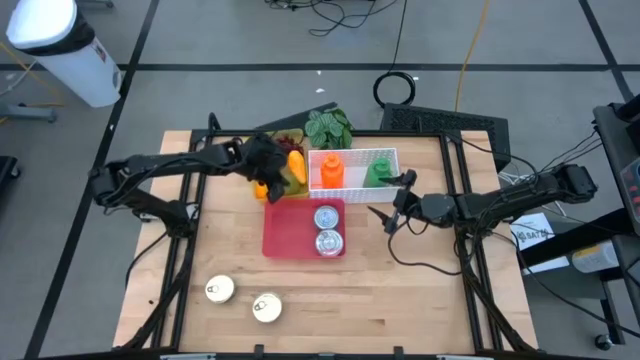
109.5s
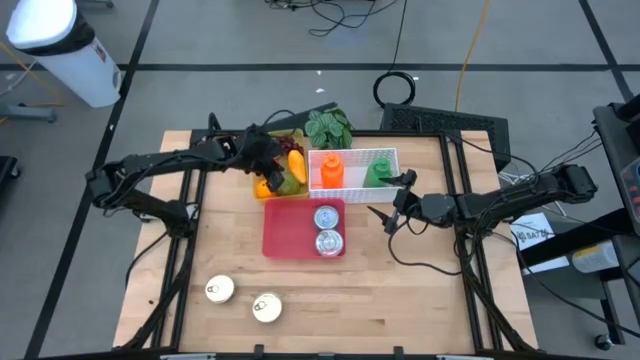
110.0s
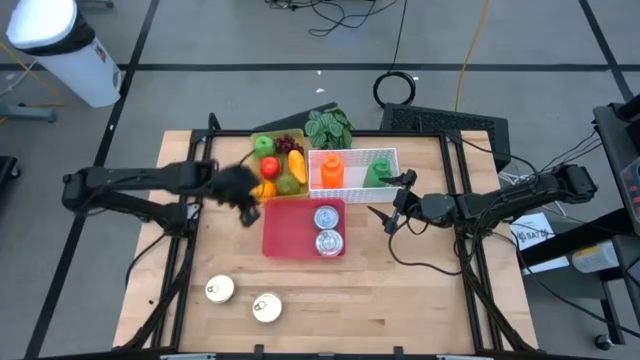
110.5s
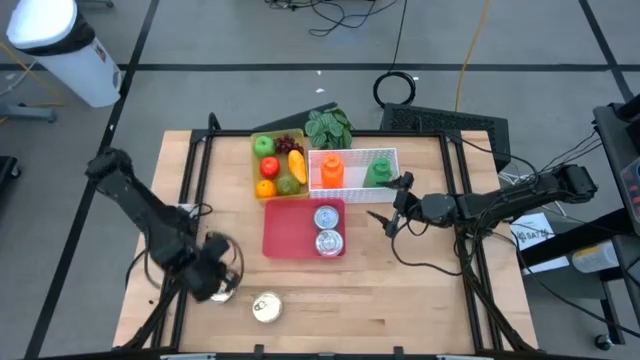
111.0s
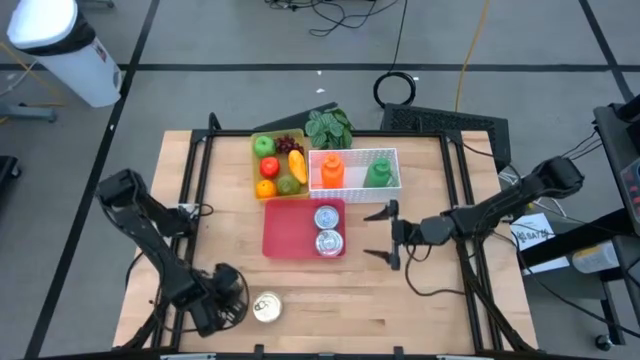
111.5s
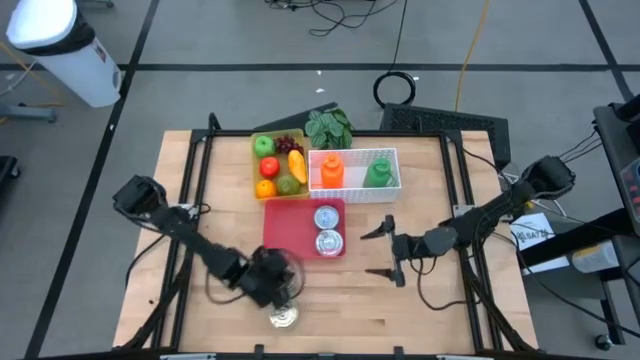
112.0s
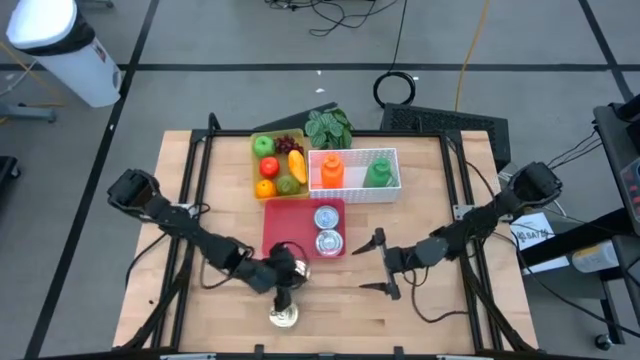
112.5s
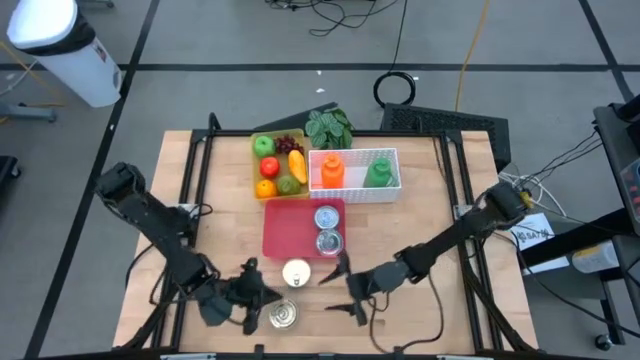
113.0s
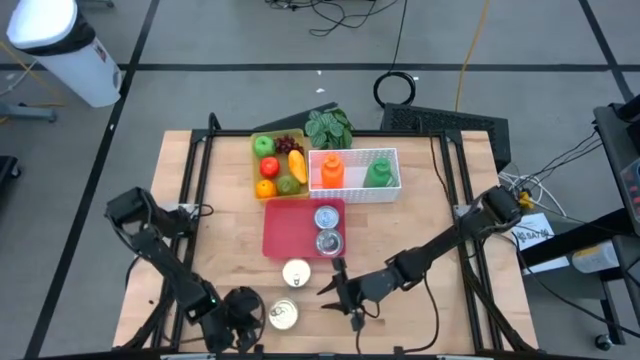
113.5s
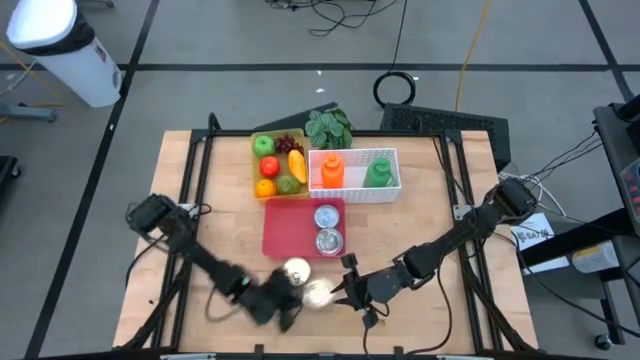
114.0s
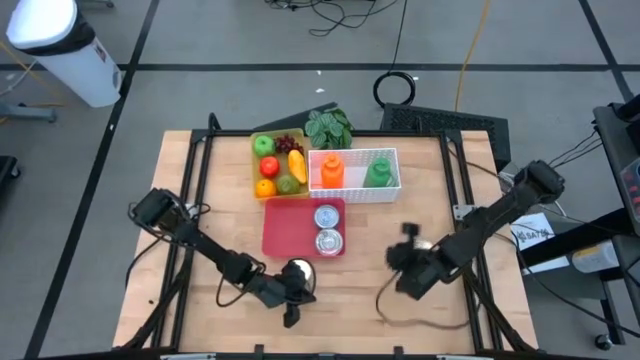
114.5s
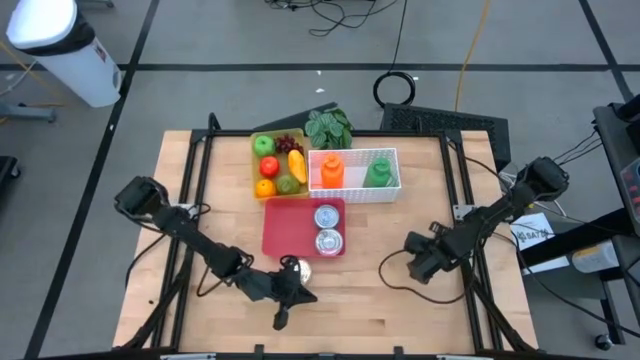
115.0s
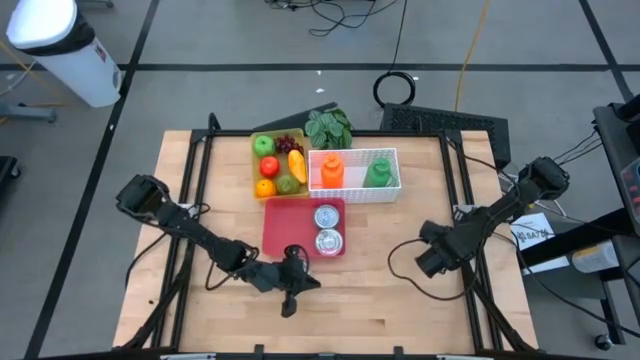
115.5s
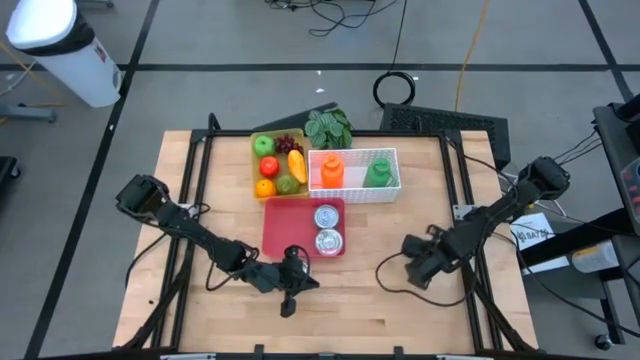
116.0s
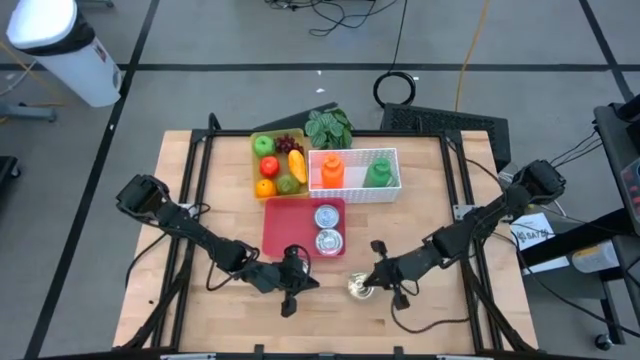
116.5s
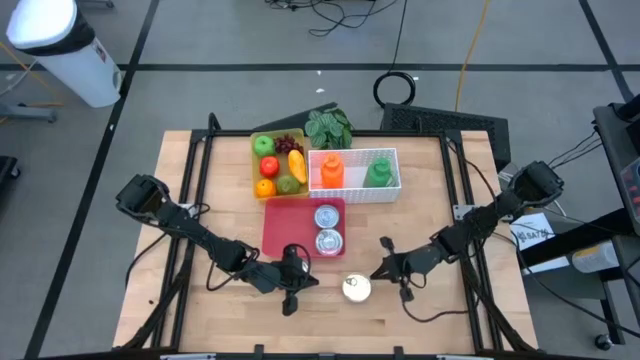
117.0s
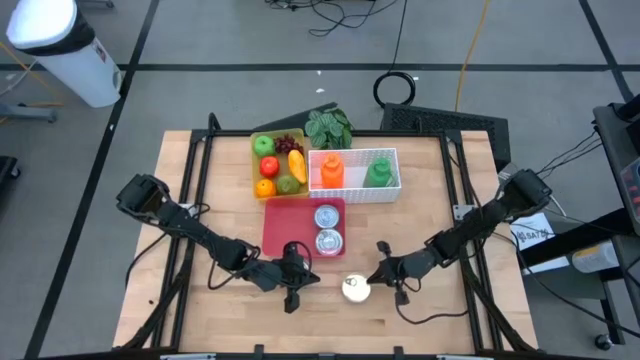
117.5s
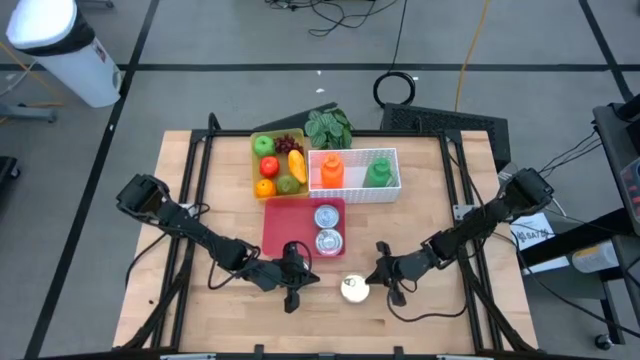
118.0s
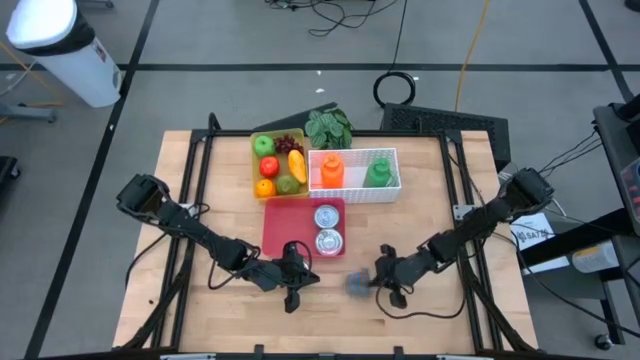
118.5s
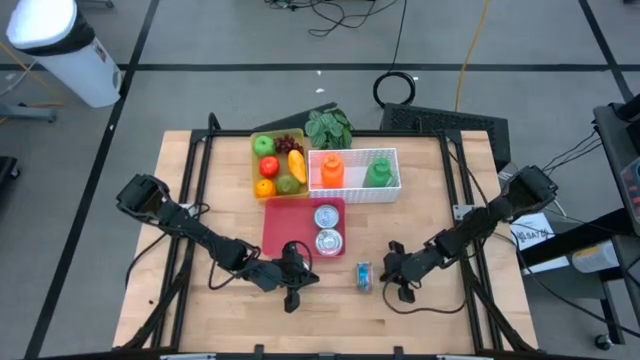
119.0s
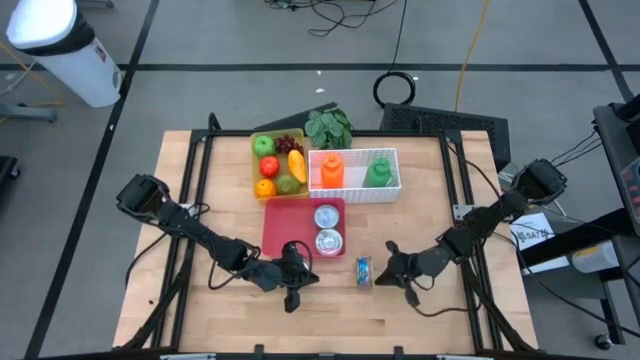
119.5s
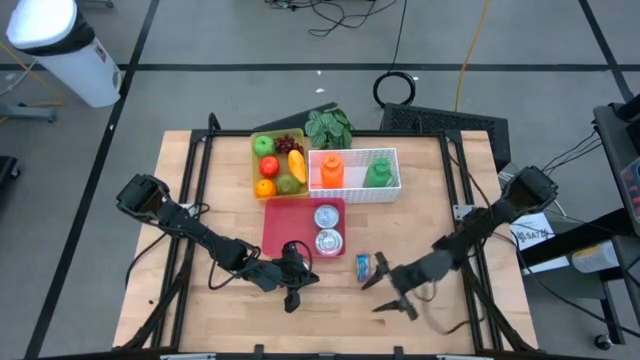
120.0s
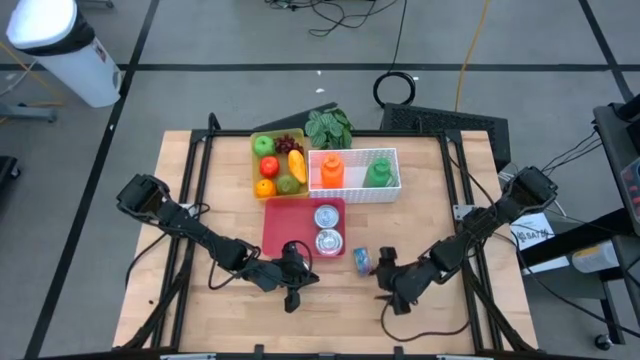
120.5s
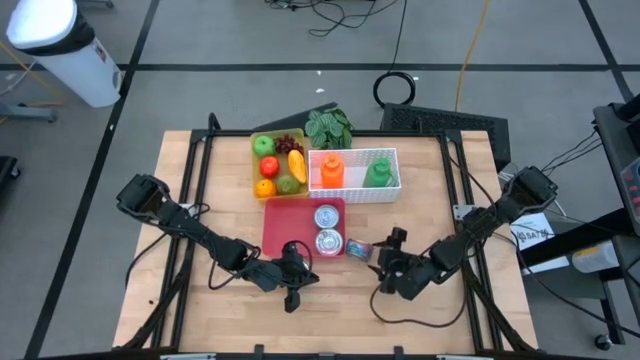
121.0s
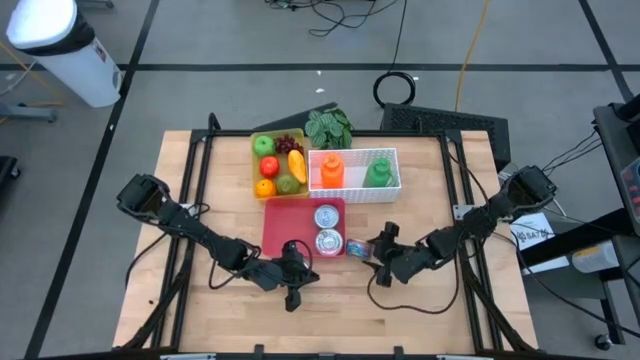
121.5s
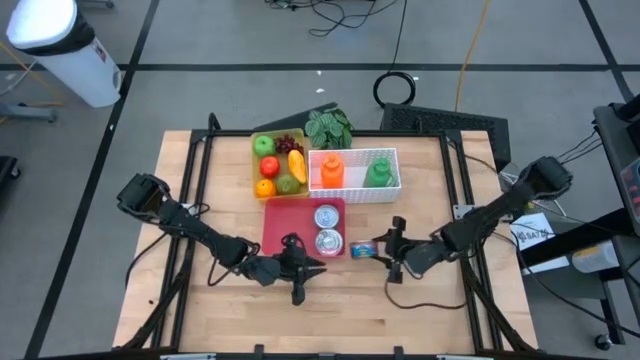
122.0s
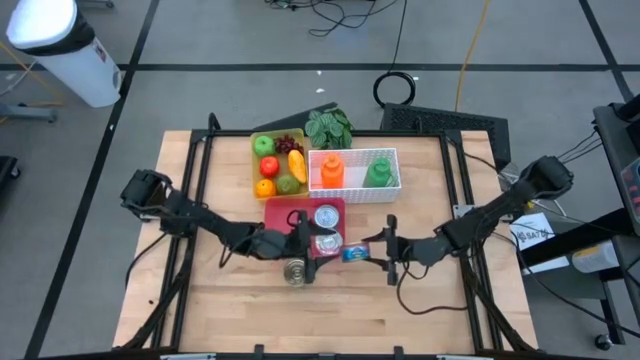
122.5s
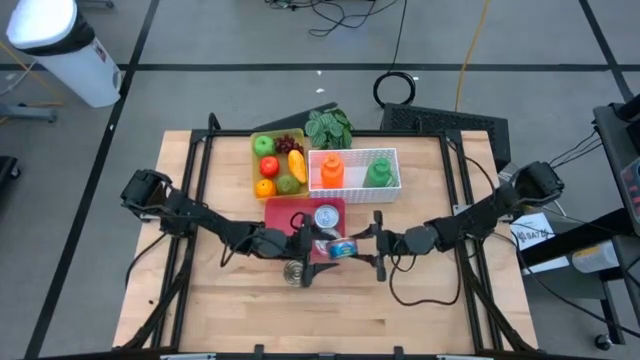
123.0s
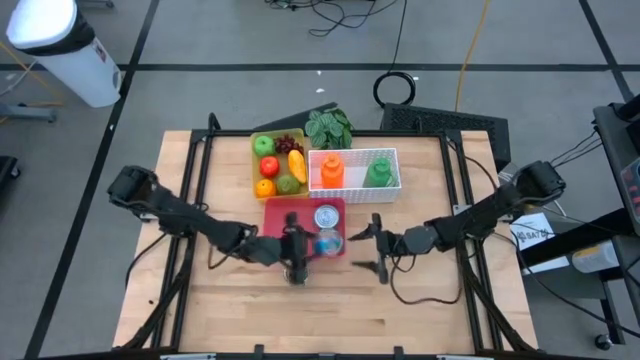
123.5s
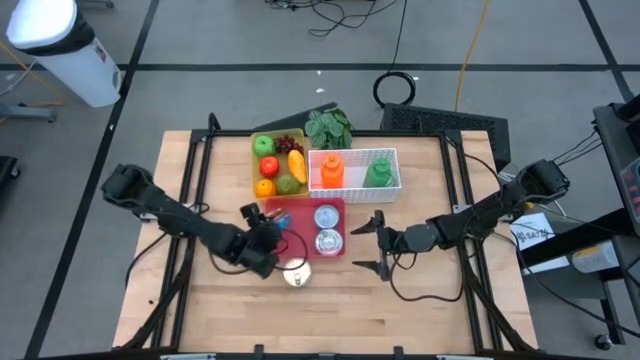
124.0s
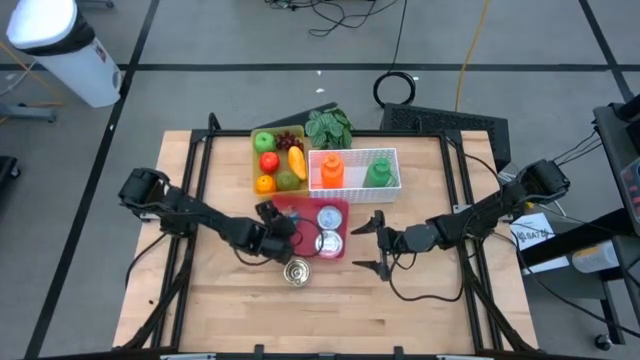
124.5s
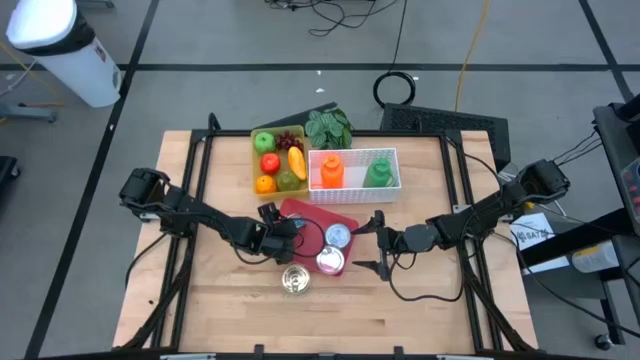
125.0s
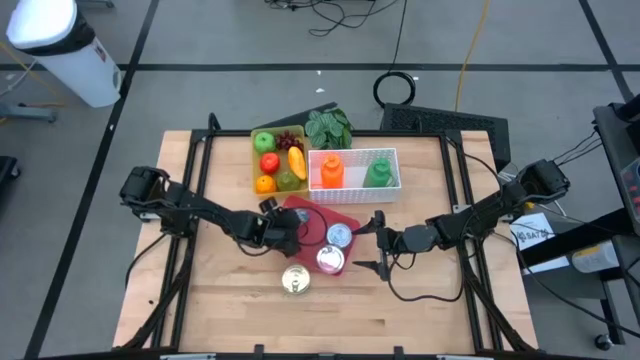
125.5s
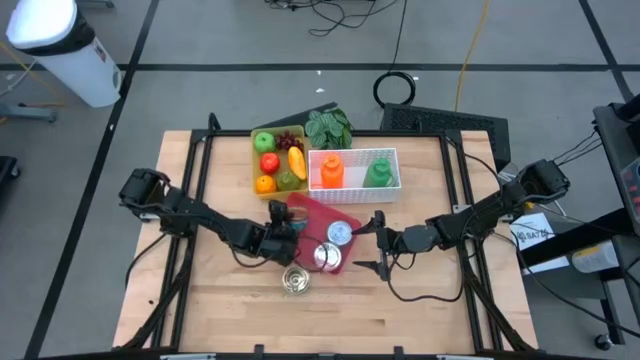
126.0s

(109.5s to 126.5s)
Task: Pick & Place Food Item
Put the bottom blue pink tuna can in the pink bin

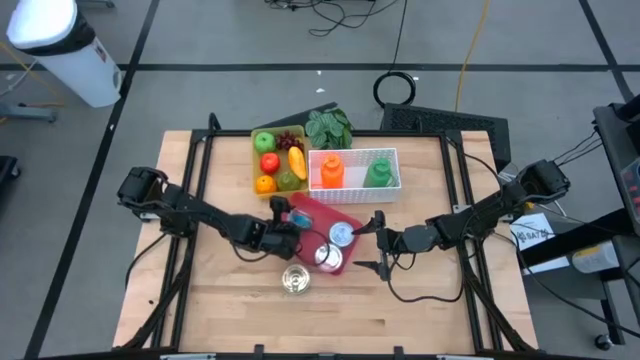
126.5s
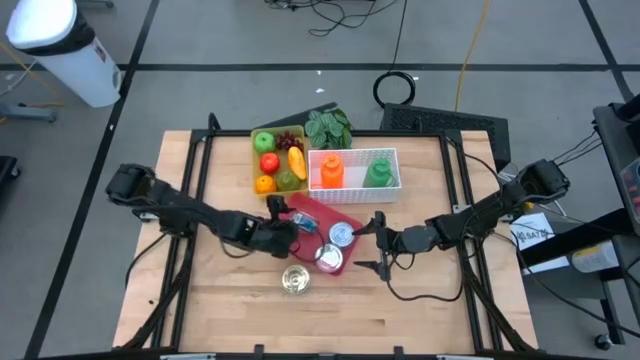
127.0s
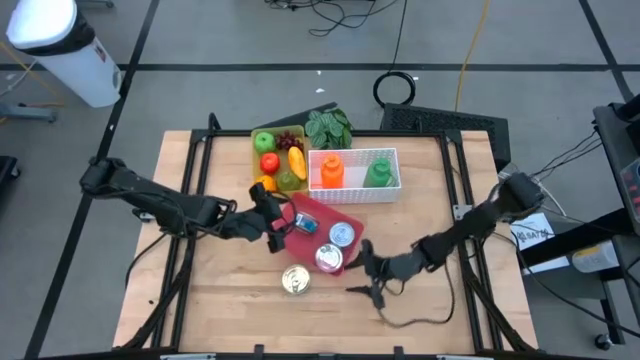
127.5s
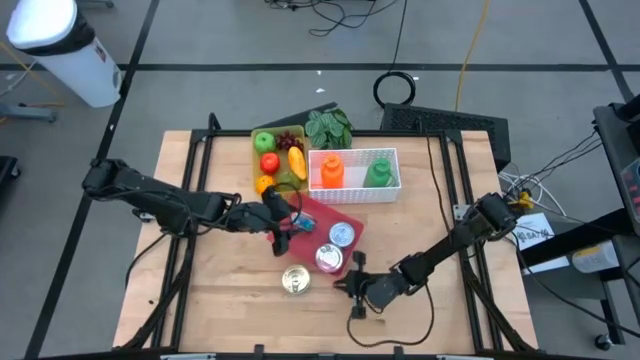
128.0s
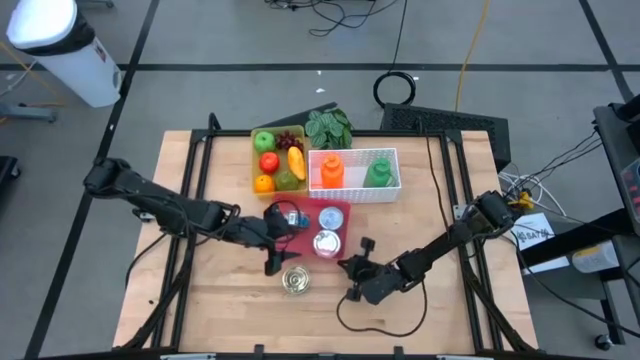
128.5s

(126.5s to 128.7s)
Adjust the pink bin

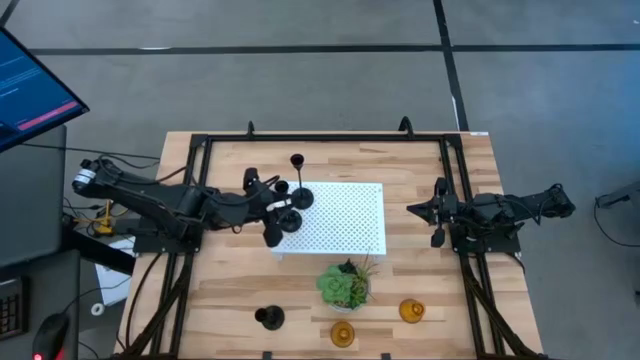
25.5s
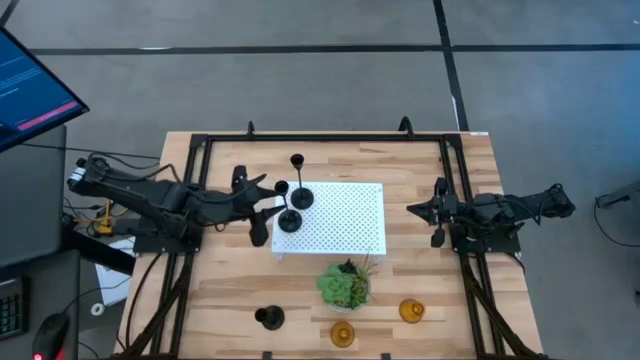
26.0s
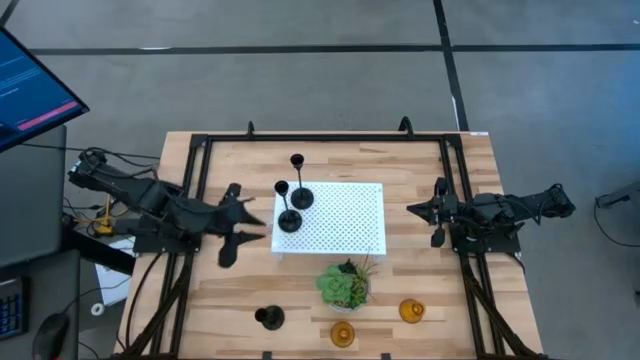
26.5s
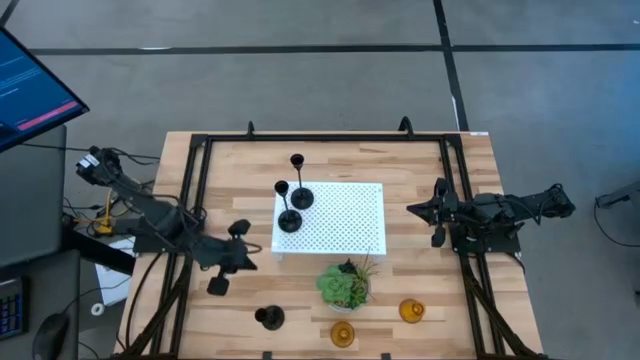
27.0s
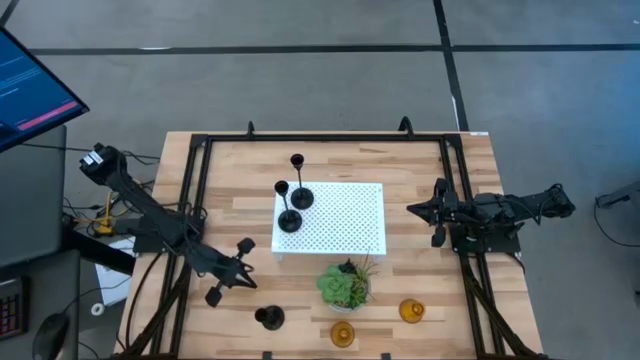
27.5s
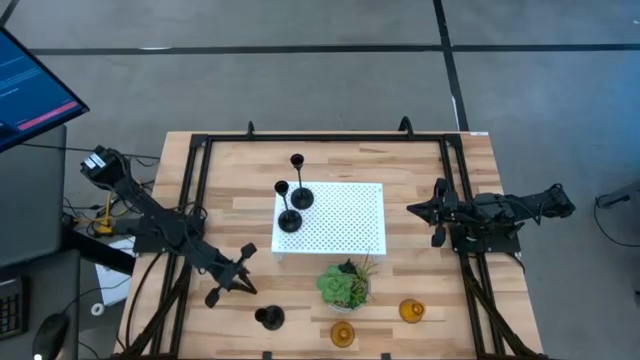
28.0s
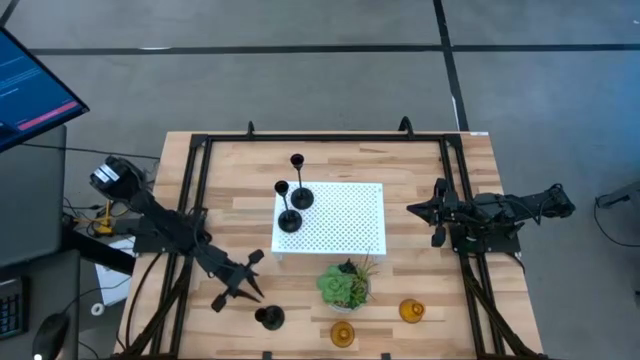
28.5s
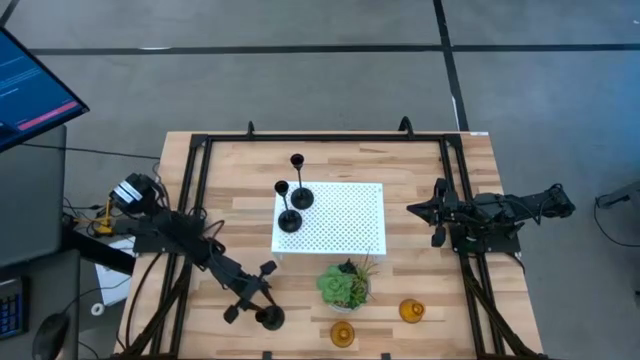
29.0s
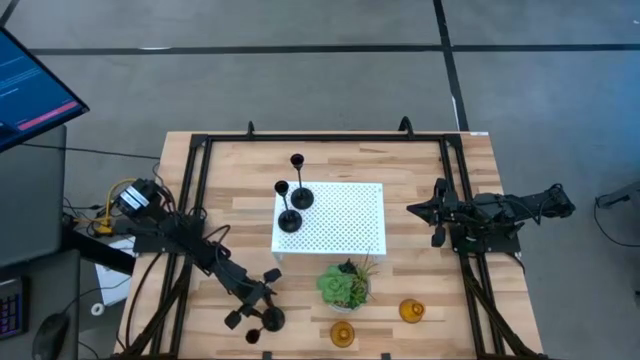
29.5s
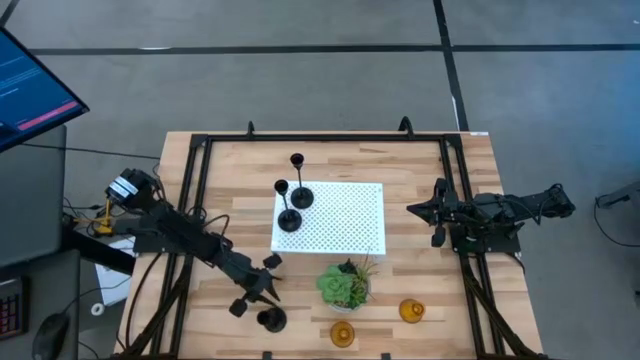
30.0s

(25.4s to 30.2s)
Task: Pick & Place candle stick holders
Put the black candle holder on the shelf
